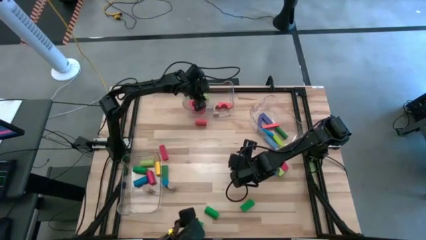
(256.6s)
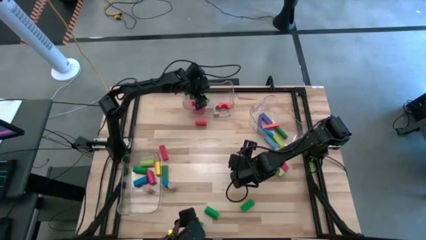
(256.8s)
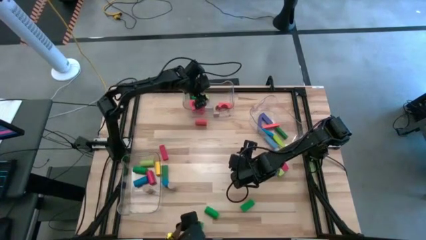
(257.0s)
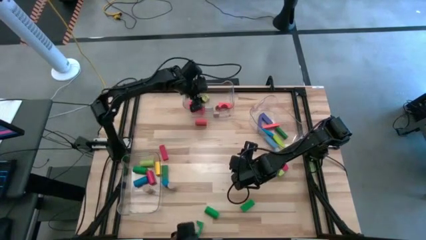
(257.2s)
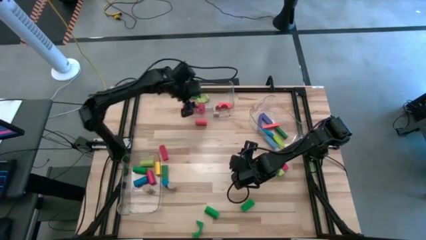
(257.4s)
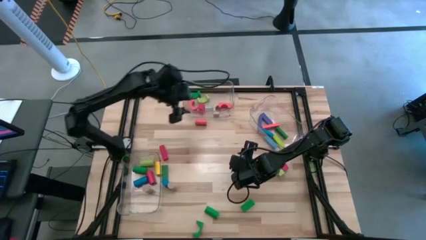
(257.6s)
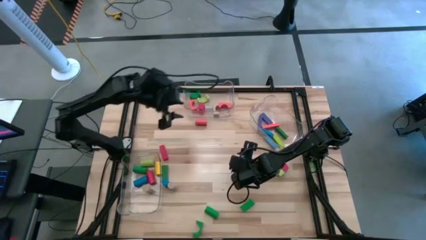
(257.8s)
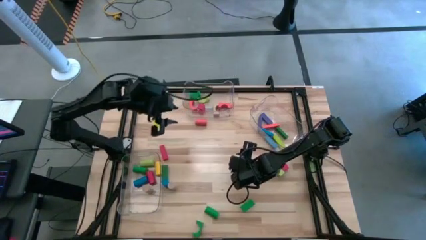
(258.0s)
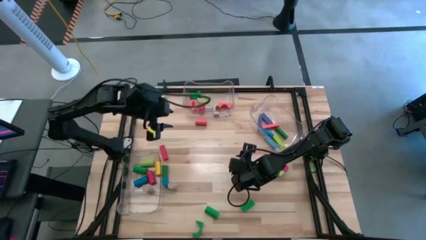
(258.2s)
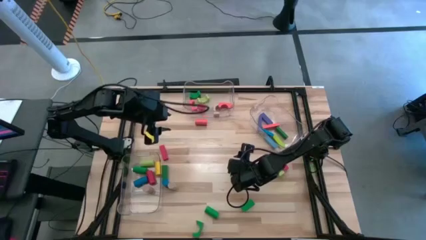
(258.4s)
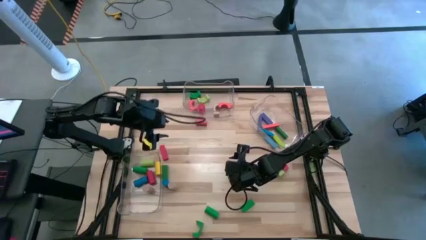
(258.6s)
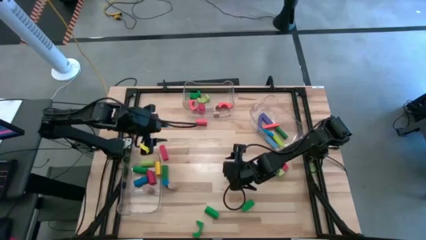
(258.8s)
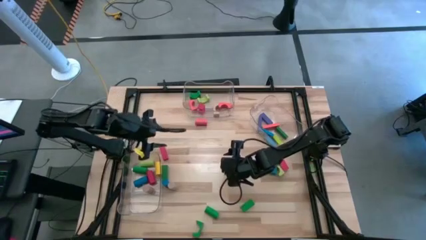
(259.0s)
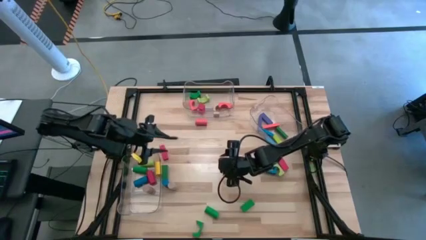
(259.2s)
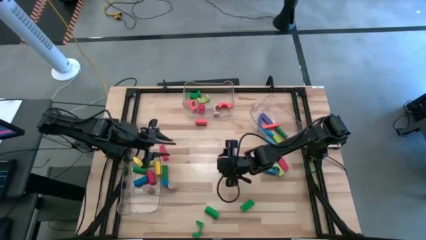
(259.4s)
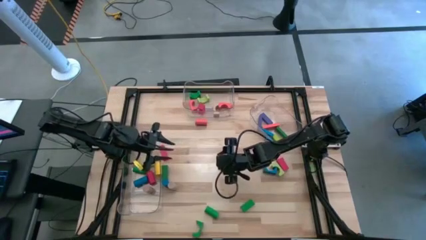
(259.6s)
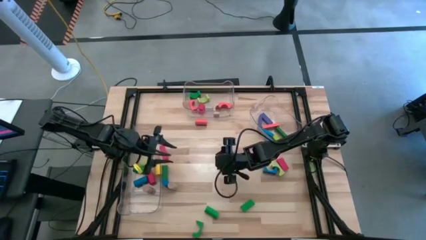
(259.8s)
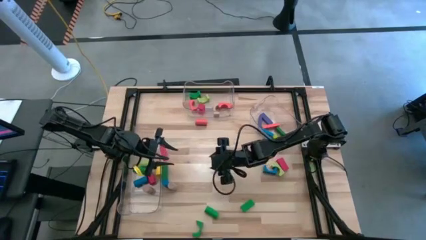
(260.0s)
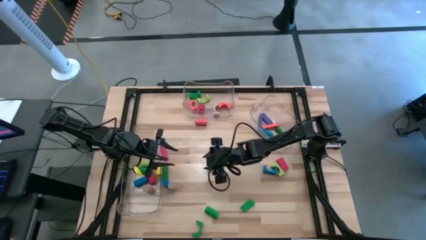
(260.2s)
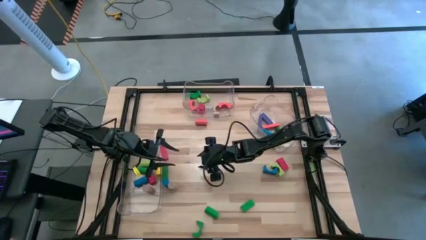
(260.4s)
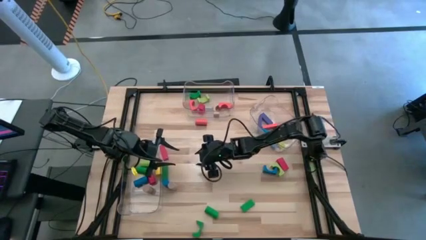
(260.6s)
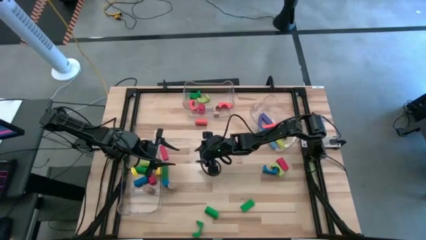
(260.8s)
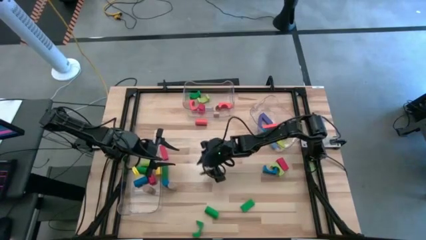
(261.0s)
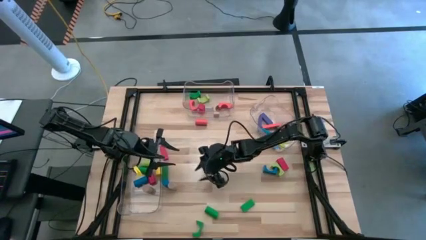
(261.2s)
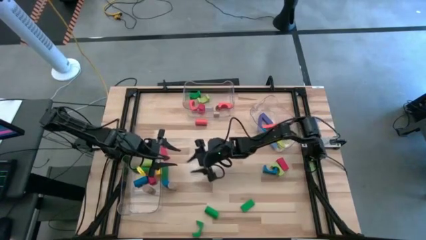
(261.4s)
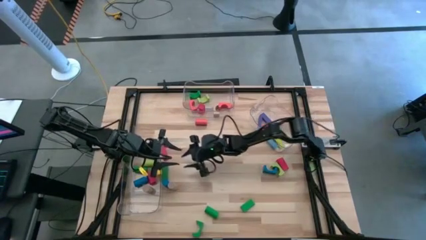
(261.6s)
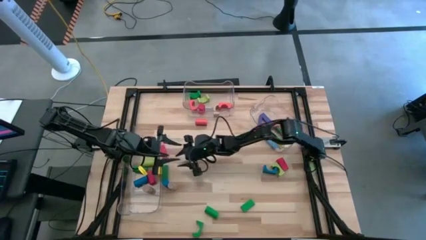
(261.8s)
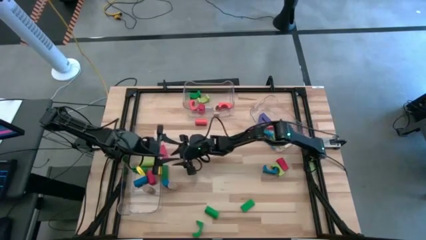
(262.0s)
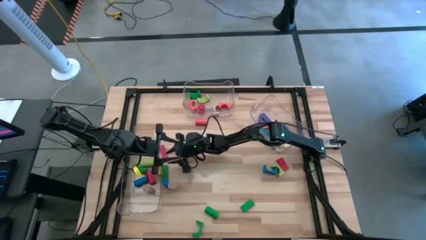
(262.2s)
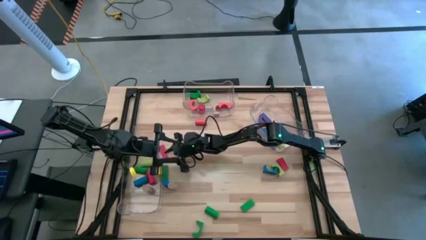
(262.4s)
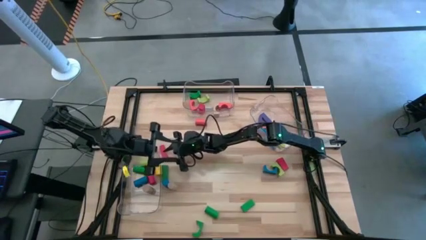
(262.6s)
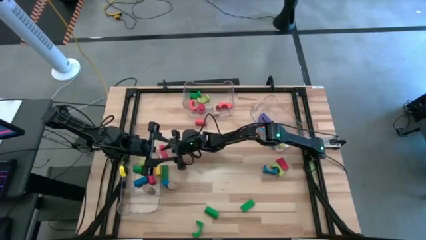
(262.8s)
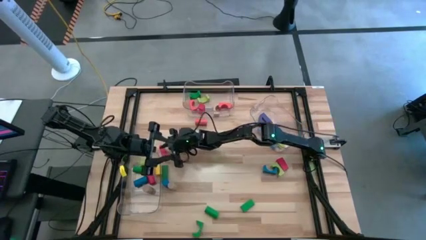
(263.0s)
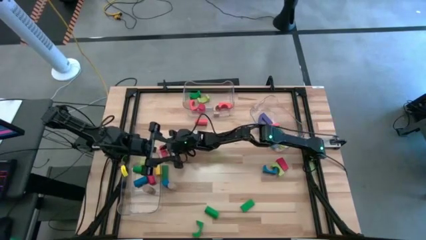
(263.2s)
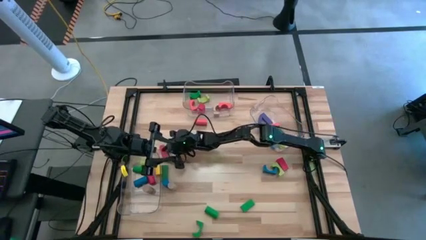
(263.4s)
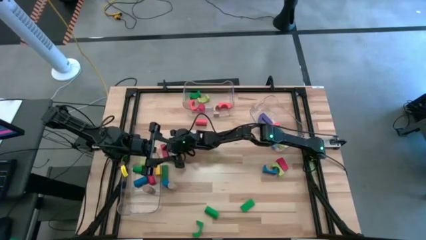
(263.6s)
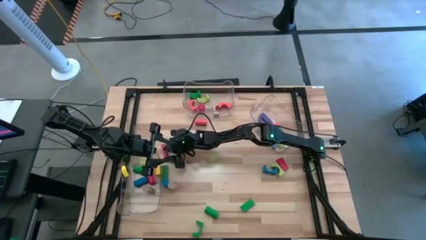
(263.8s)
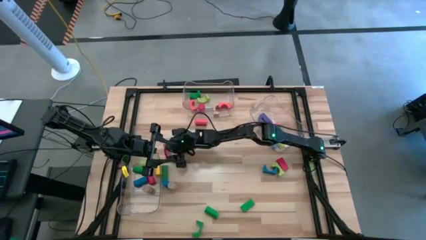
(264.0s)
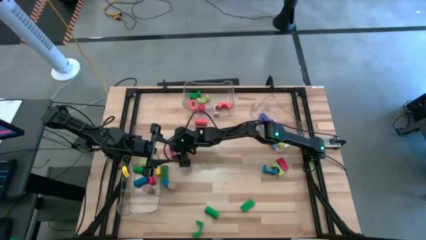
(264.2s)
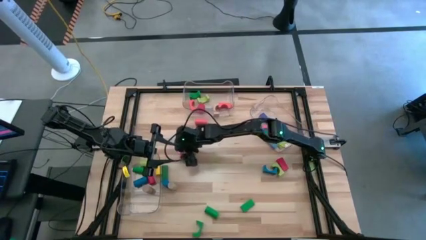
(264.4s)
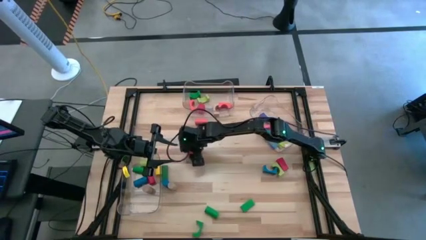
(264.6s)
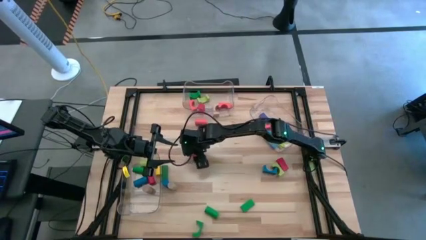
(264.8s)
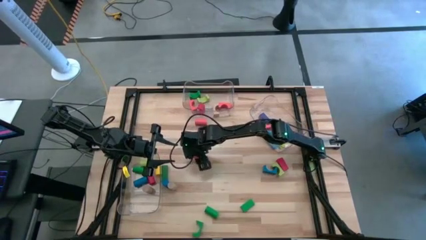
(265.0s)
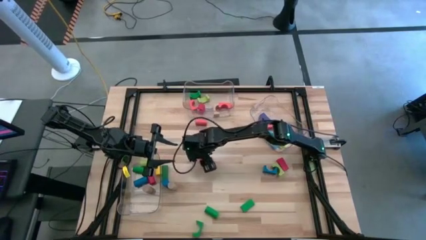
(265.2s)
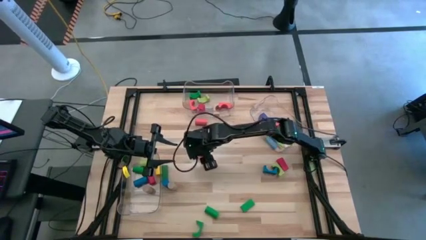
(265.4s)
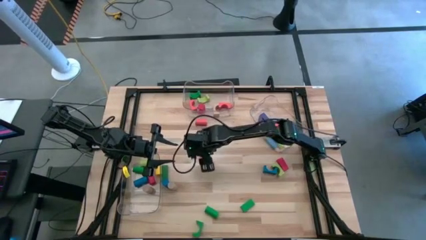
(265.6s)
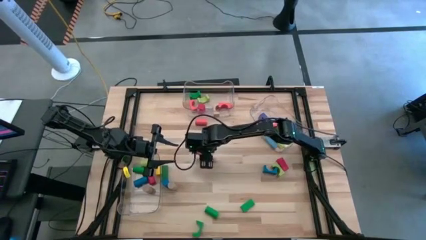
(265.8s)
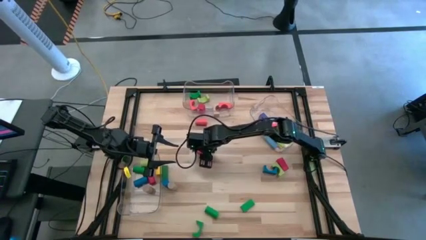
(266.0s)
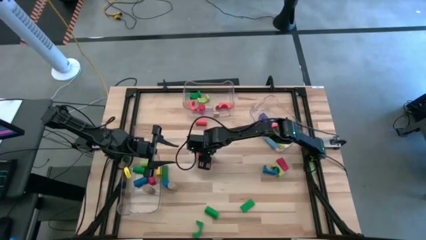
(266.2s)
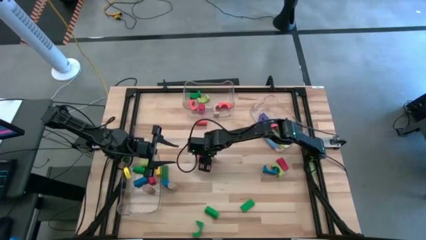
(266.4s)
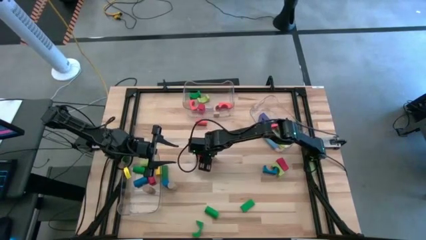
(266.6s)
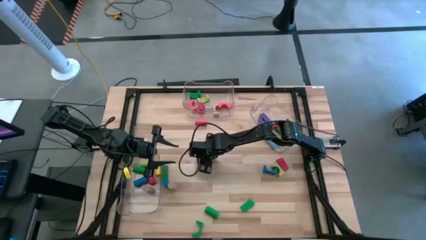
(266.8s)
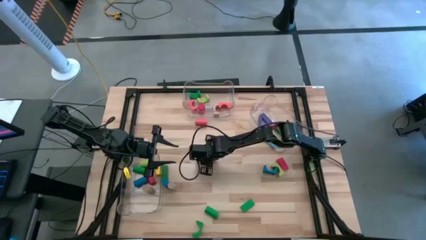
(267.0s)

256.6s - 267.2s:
Task: Sort blocks by size
Put the red rectangular block into the right transparent bin
